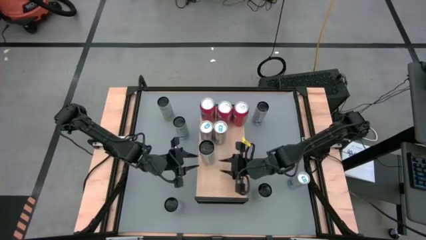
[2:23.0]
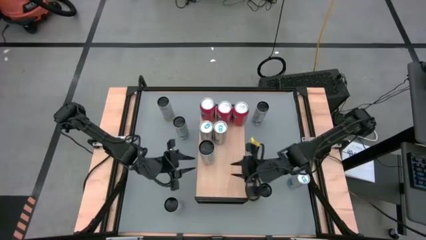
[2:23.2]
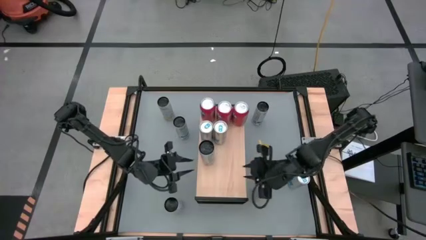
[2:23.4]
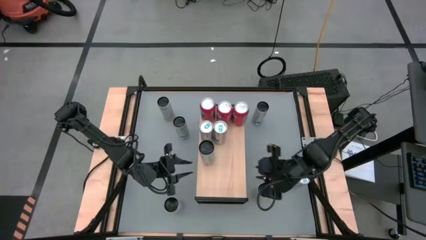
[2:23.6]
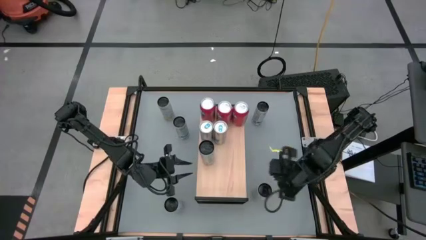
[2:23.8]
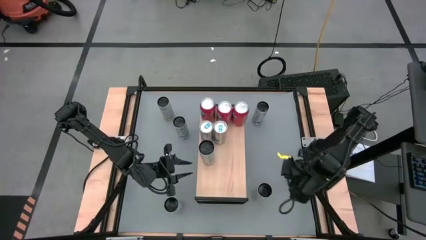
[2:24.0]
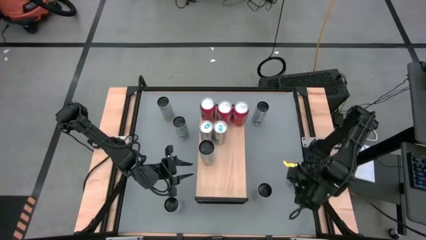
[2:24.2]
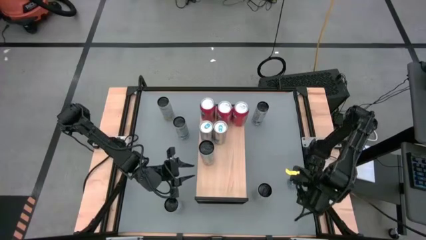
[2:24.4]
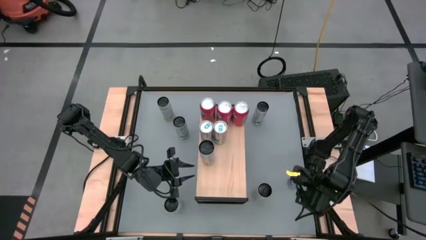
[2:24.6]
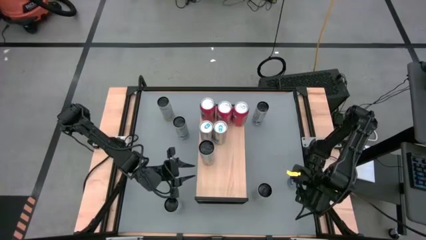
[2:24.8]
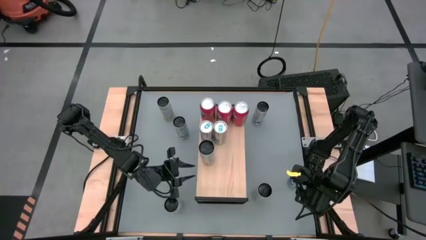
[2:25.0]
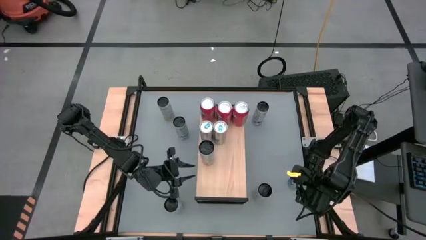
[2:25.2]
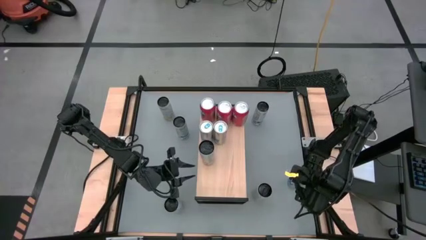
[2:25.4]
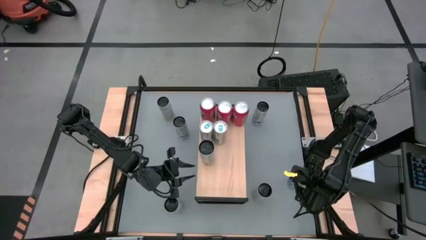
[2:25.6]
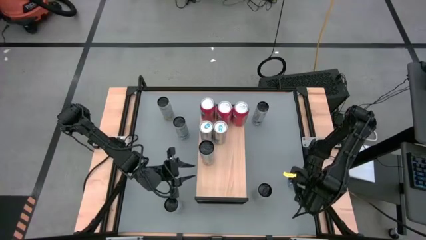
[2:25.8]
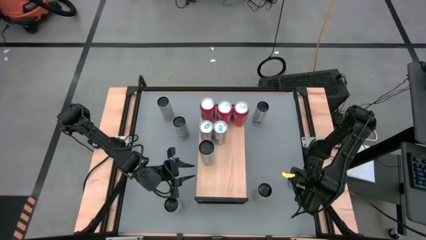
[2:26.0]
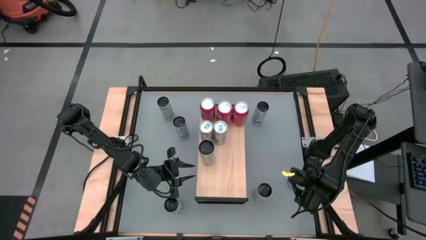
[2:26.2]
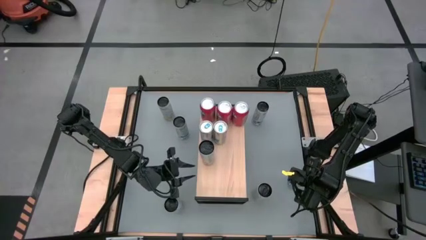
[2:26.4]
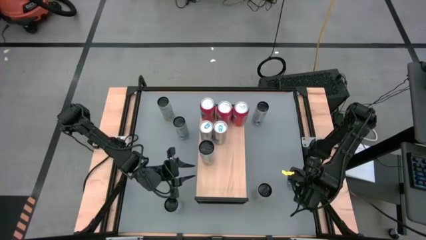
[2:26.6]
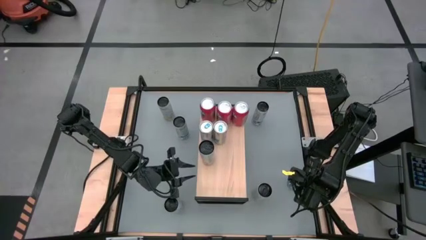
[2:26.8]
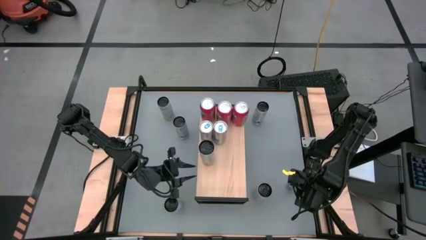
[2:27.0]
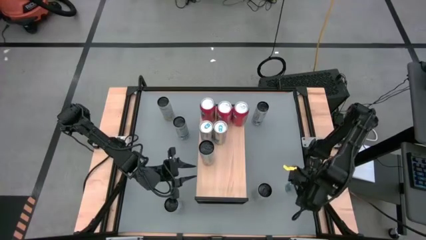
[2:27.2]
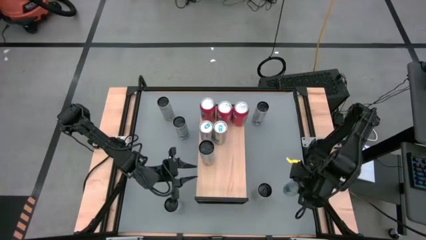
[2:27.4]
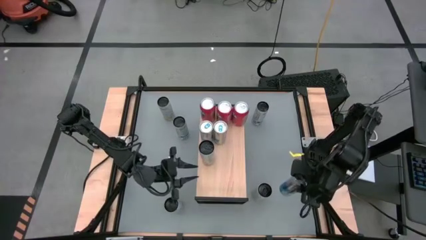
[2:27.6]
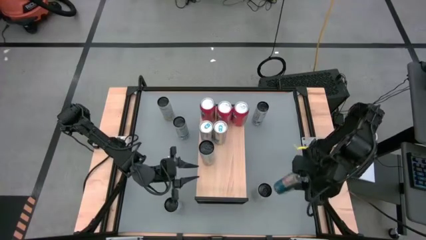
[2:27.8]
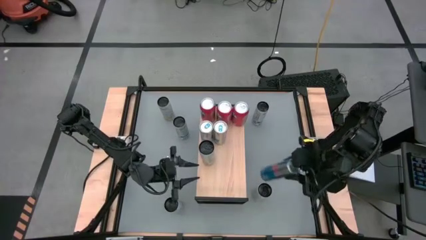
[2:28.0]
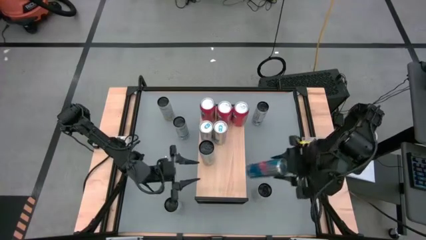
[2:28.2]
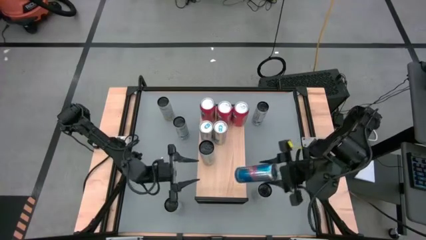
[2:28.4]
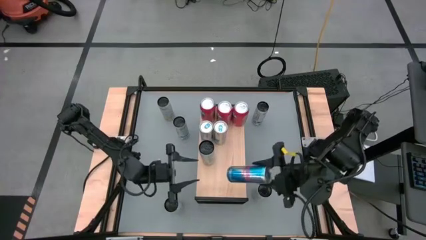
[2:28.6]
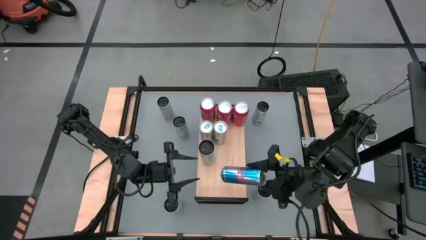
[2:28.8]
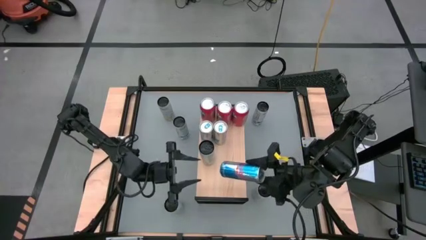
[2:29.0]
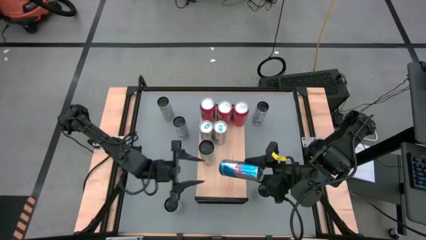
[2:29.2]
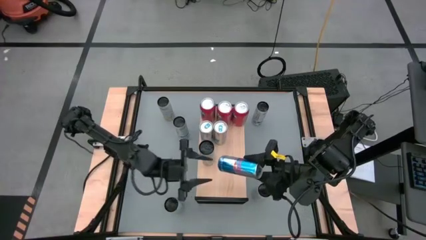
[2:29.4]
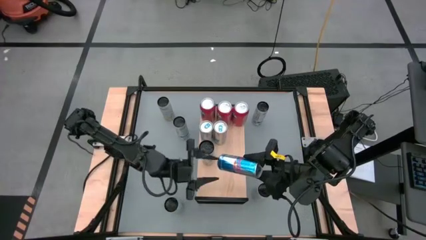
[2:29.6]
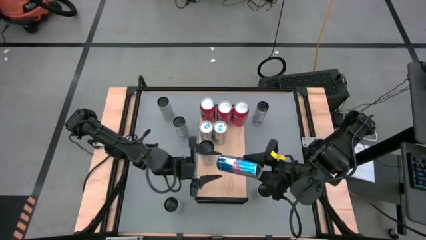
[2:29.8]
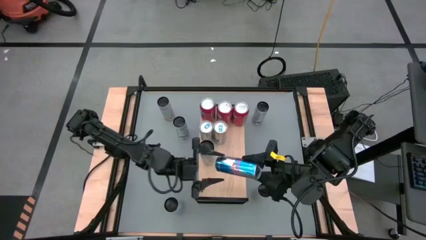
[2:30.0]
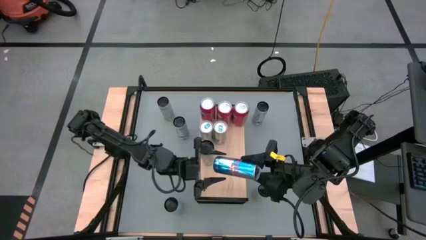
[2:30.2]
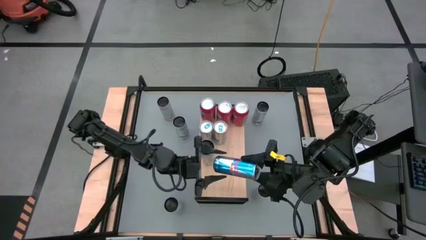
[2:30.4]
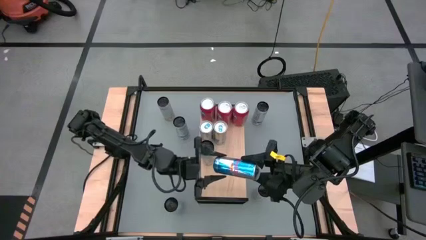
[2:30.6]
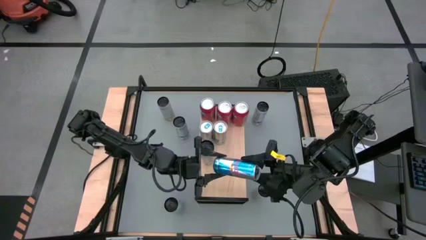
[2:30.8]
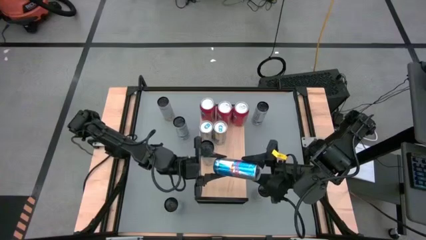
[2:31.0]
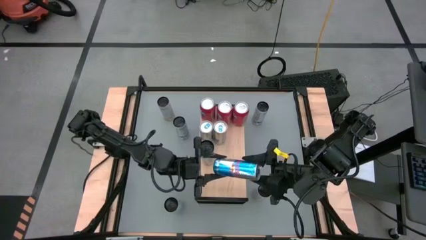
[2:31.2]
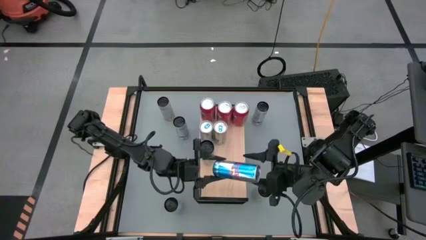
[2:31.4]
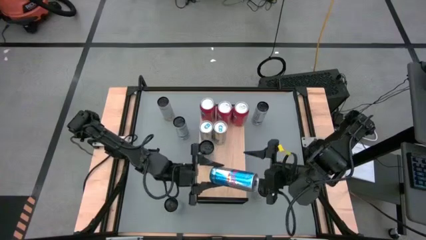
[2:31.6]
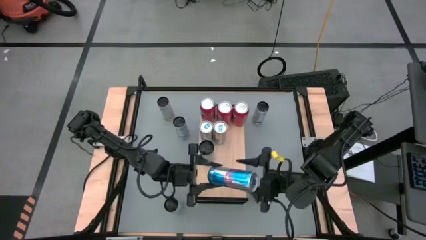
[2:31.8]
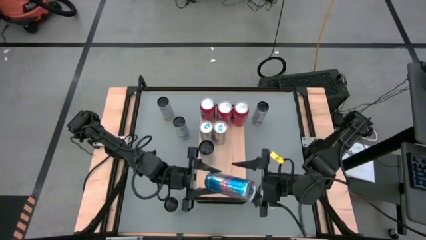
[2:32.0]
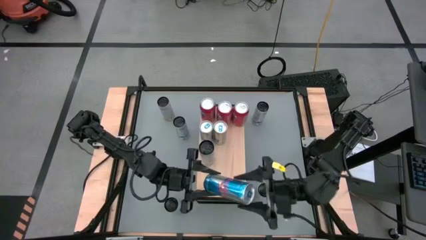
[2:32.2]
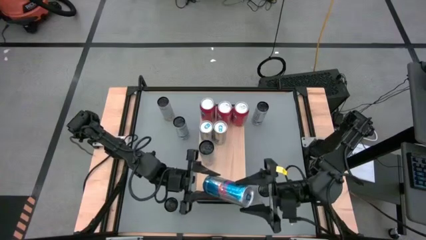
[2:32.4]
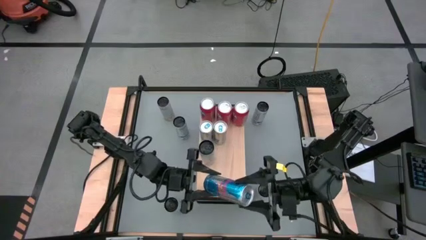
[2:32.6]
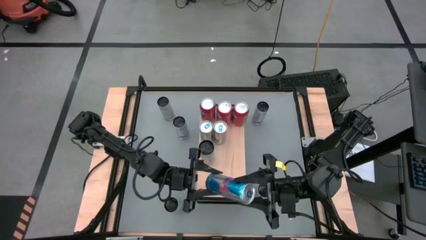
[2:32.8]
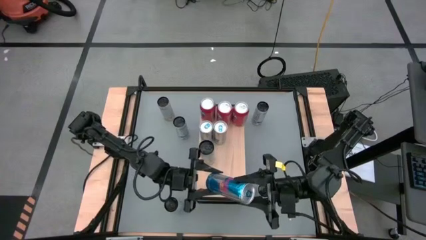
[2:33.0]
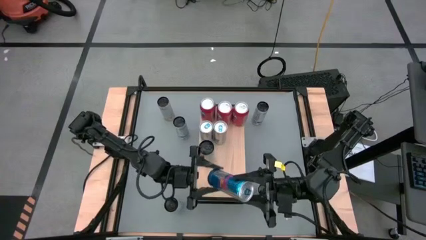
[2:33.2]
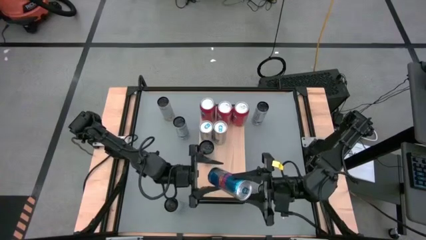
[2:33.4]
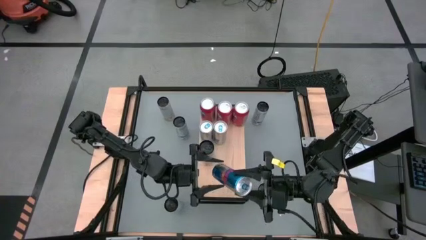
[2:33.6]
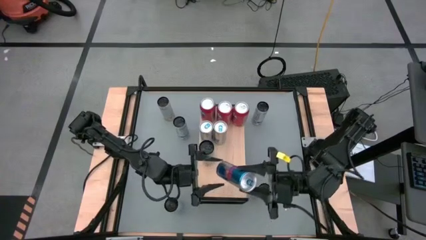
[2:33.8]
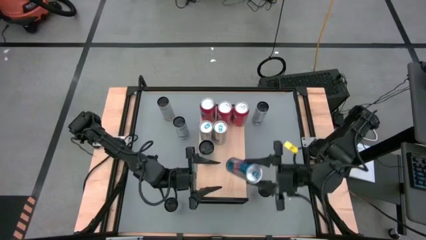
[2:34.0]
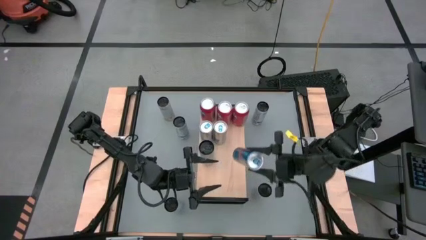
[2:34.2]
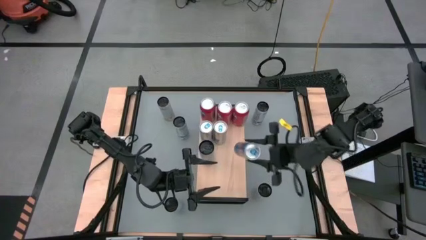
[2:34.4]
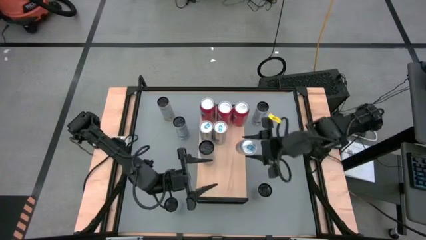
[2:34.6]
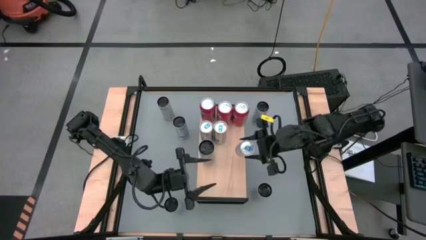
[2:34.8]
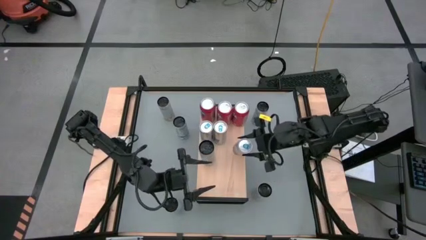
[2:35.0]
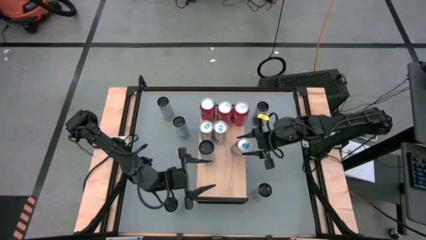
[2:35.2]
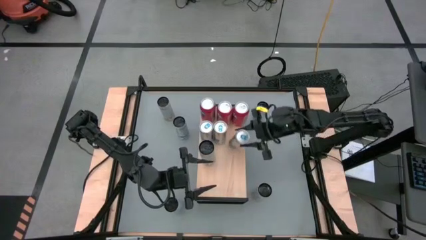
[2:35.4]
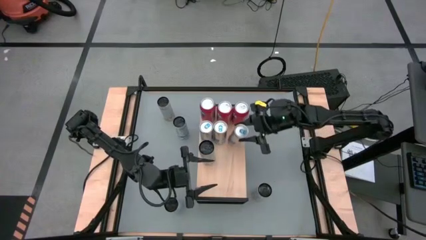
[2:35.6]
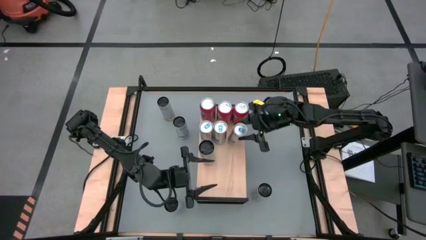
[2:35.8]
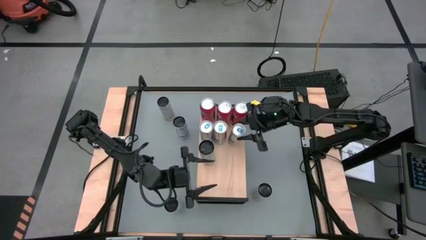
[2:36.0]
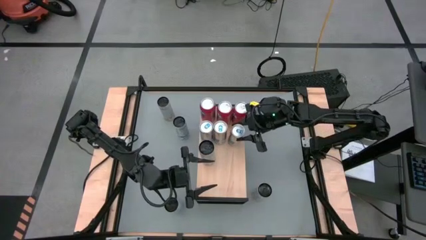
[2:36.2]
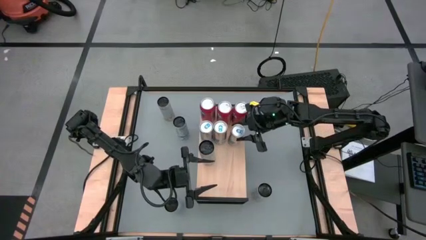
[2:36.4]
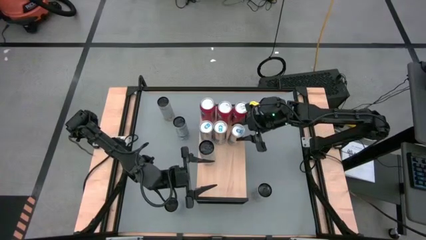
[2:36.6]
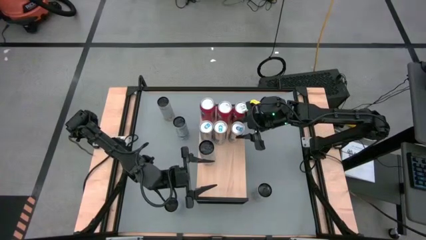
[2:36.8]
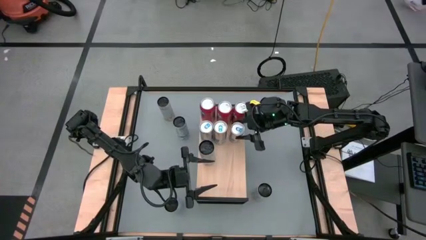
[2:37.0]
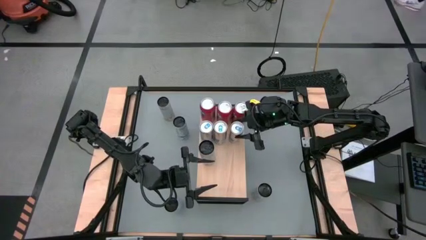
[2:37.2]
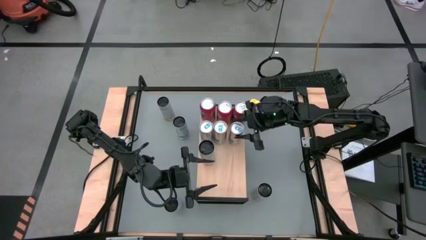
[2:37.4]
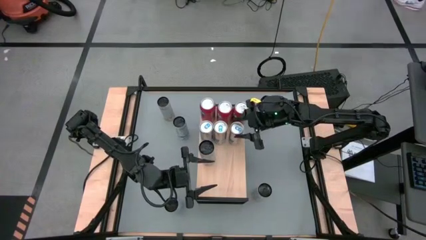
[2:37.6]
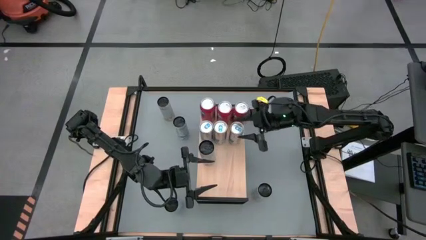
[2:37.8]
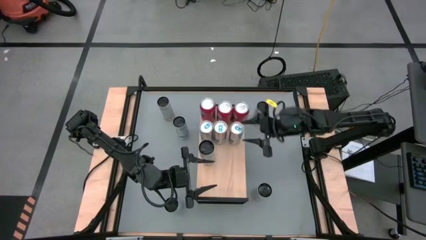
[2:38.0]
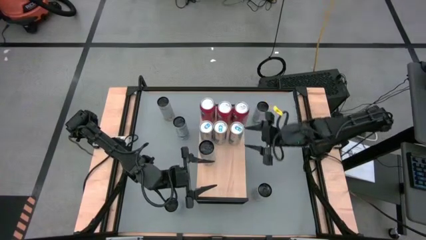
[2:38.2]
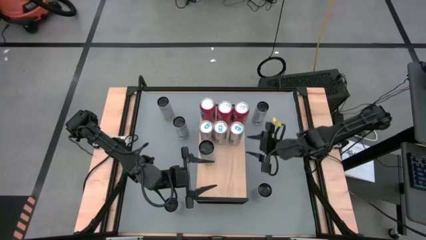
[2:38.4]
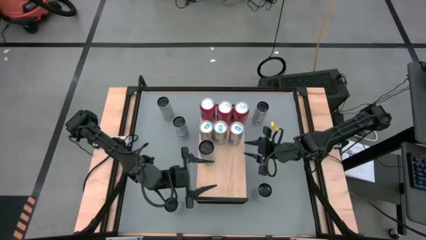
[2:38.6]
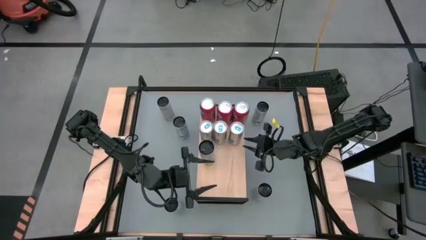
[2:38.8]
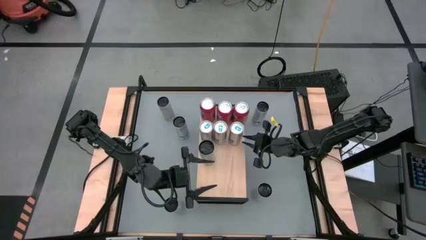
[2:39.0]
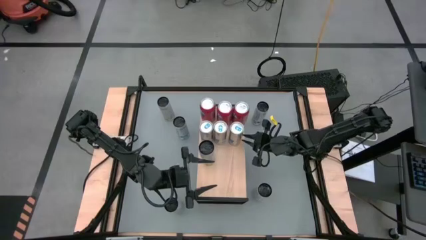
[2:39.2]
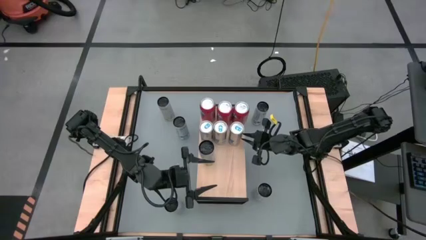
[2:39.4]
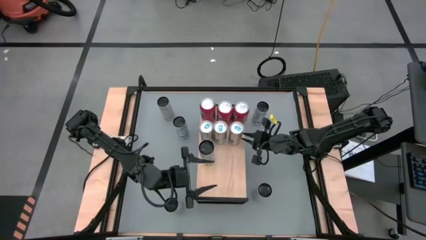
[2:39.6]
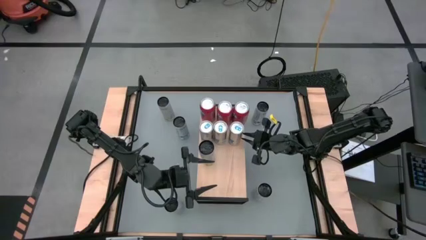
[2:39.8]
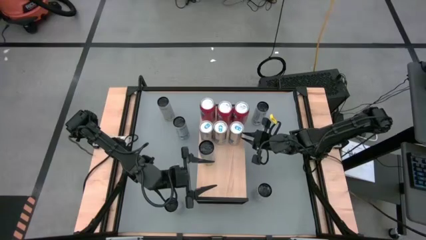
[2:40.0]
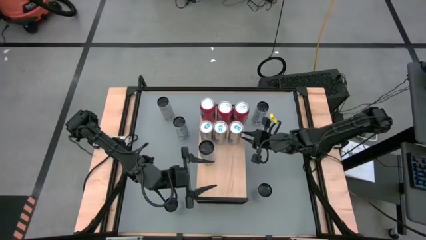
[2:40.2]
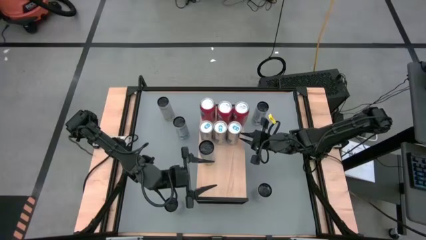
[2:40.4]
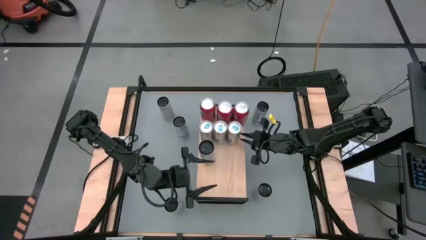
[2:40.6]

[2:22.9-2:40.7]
Task: Place canned beverage on shelf
Put the blue soda can on the shelf aligned with the other red soda can
